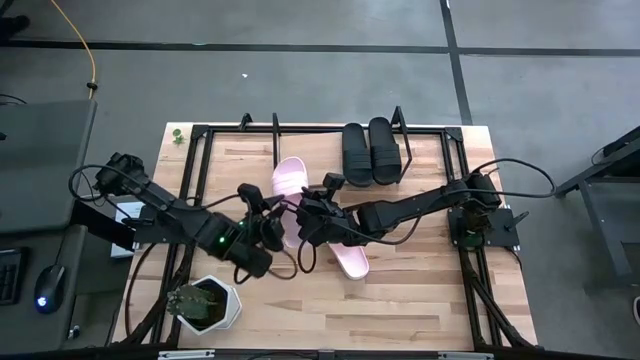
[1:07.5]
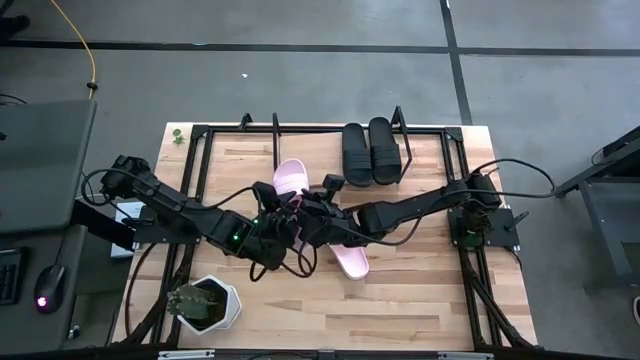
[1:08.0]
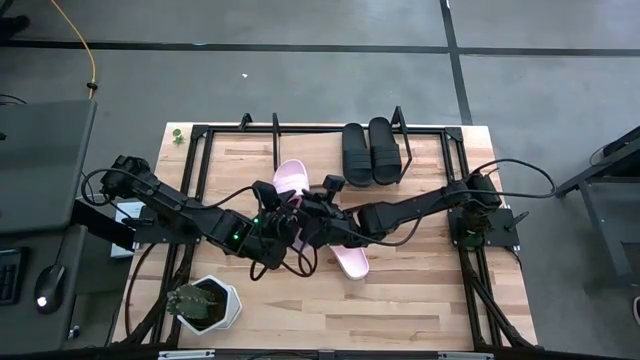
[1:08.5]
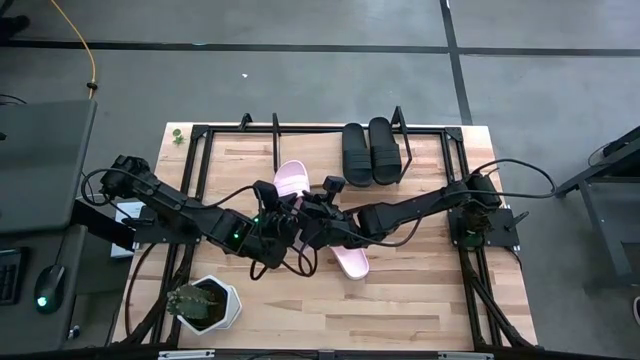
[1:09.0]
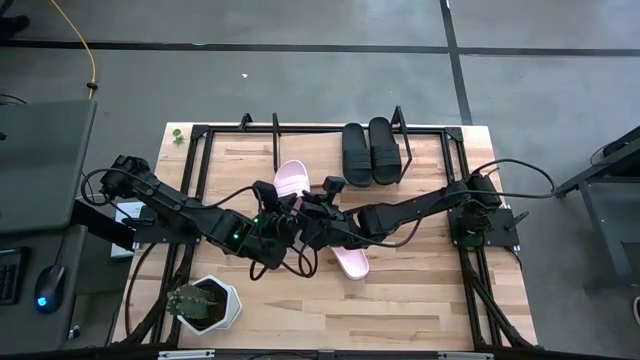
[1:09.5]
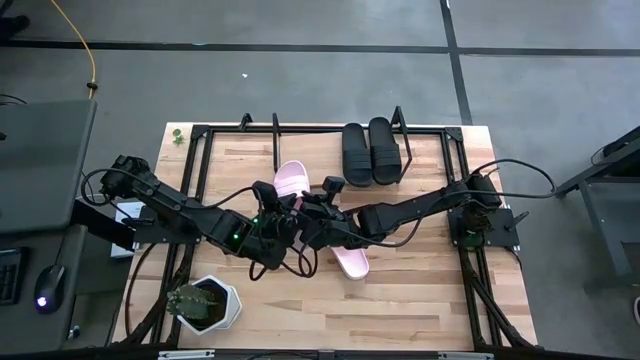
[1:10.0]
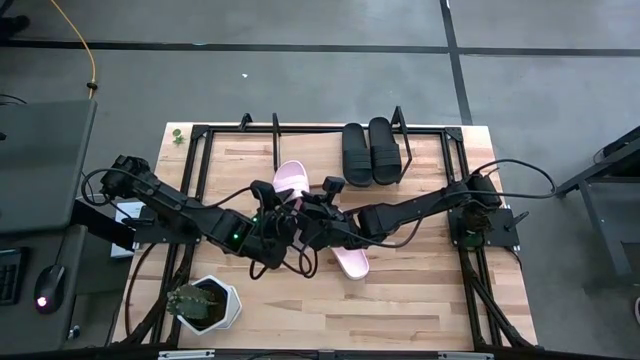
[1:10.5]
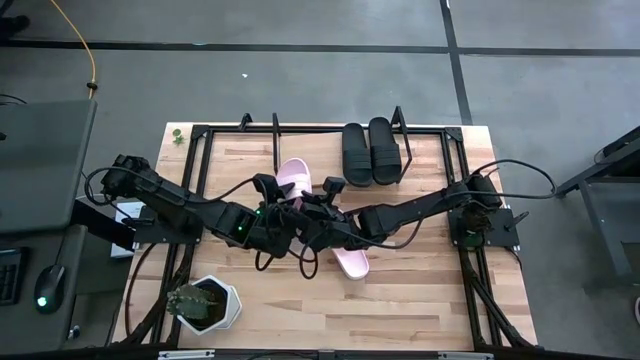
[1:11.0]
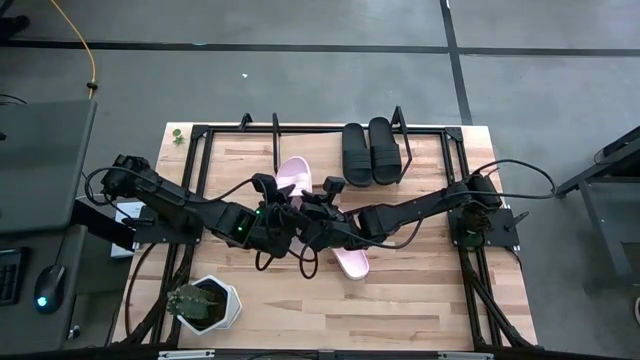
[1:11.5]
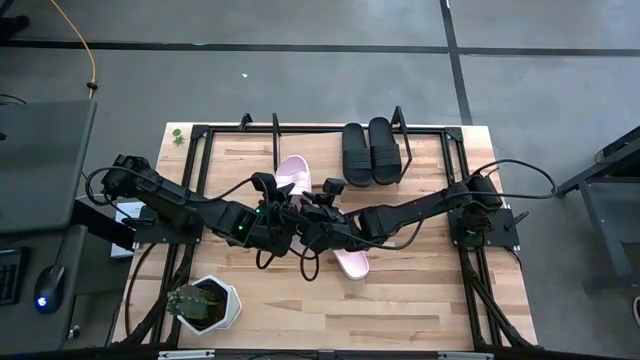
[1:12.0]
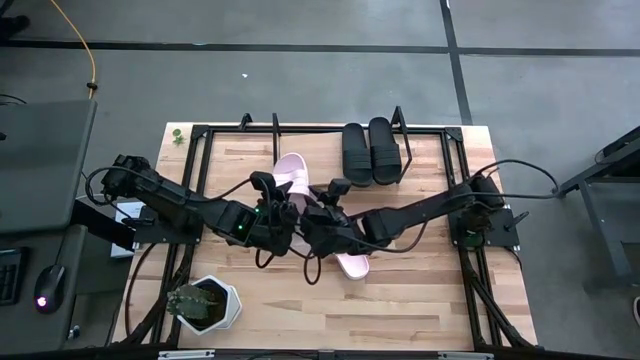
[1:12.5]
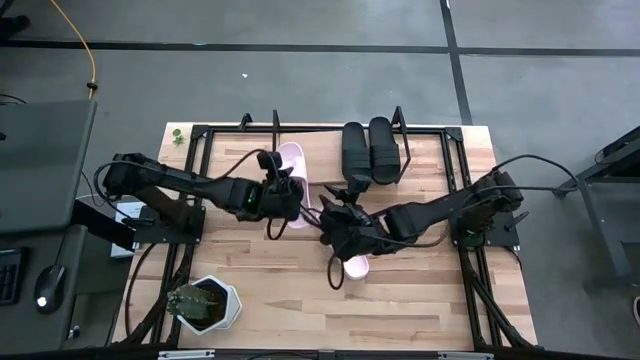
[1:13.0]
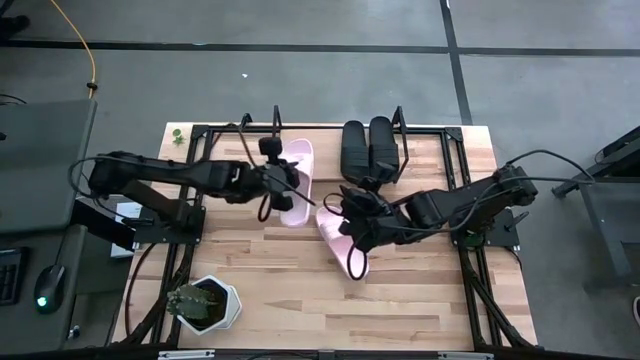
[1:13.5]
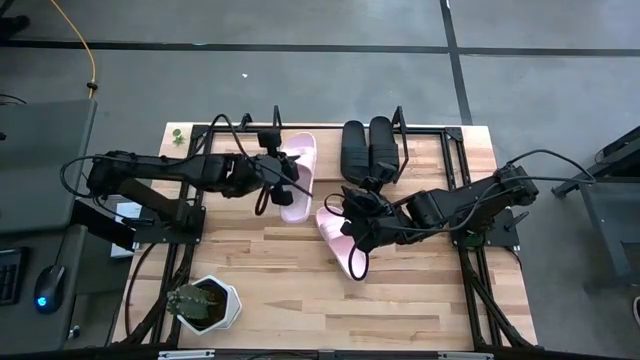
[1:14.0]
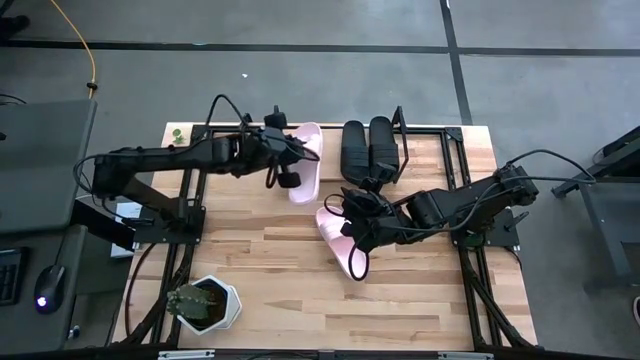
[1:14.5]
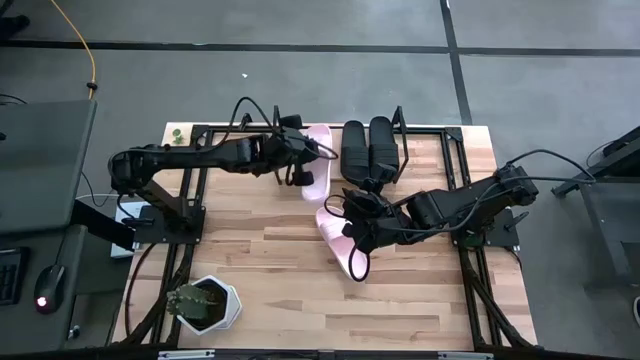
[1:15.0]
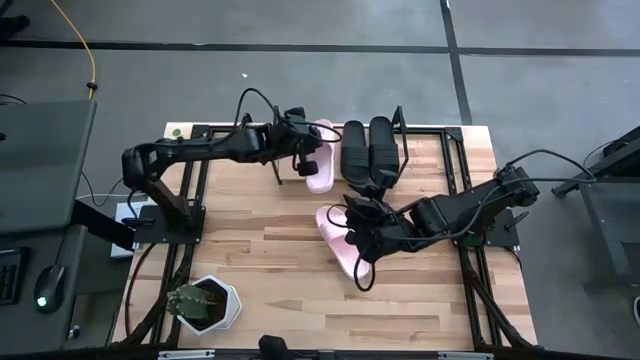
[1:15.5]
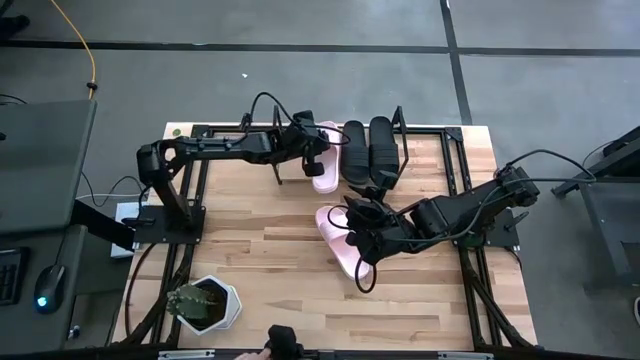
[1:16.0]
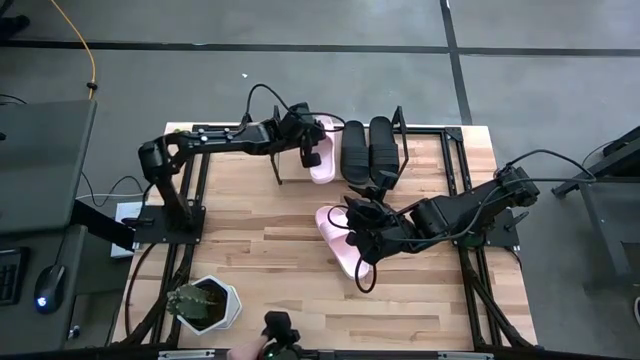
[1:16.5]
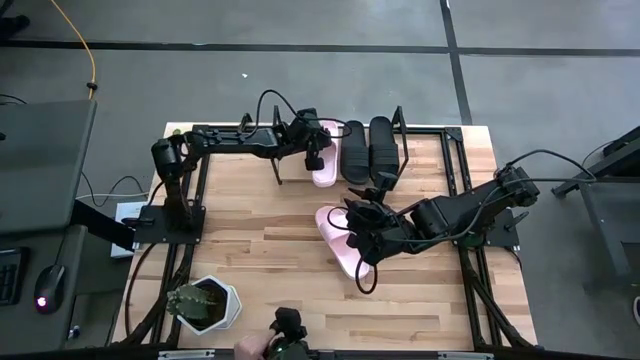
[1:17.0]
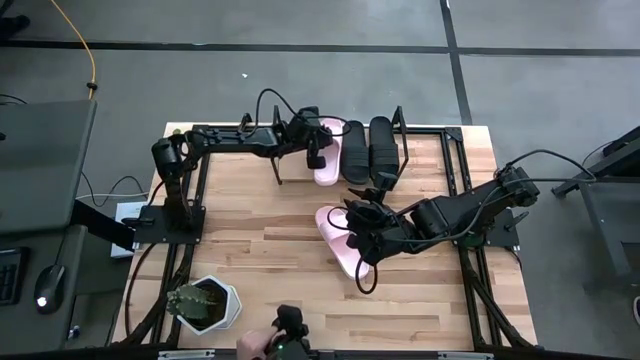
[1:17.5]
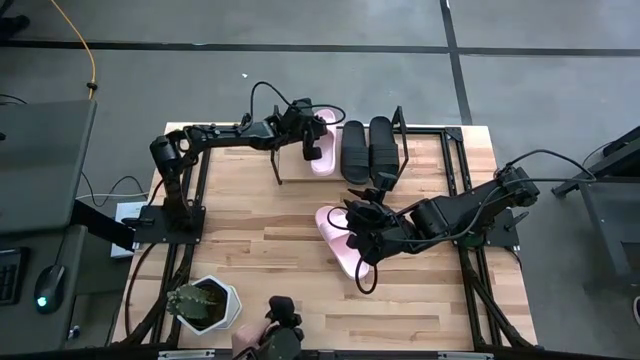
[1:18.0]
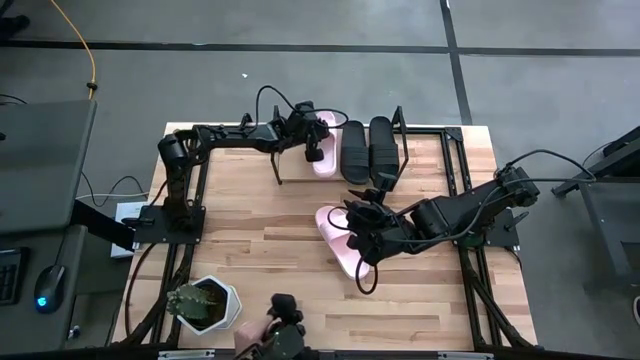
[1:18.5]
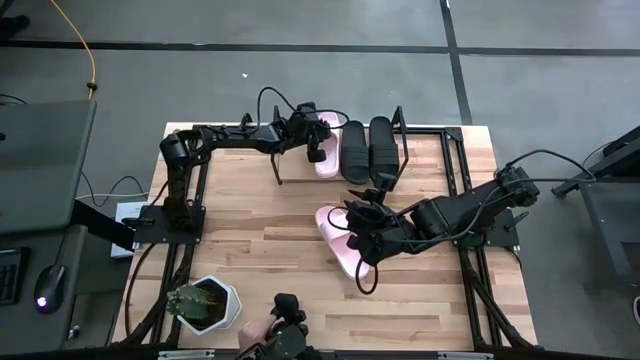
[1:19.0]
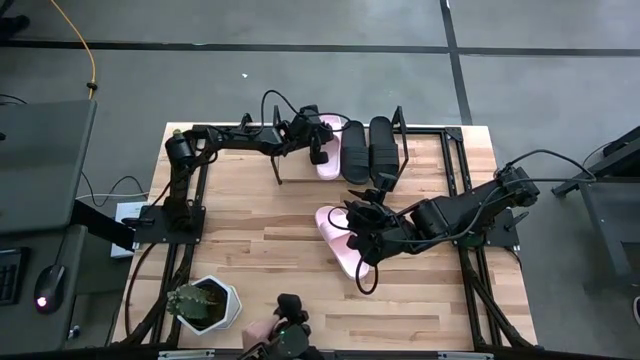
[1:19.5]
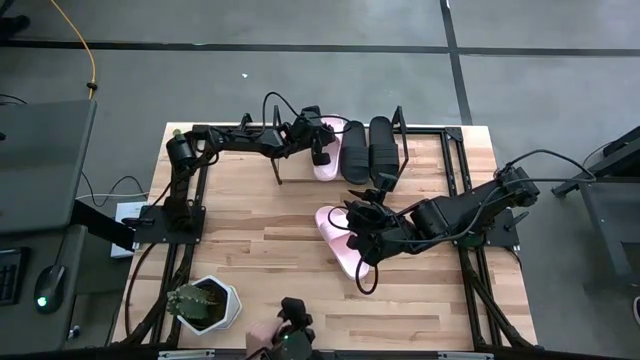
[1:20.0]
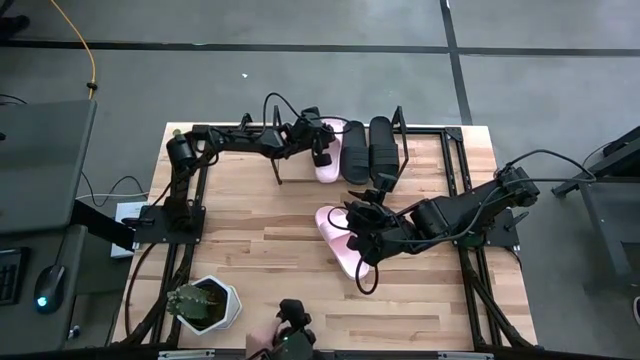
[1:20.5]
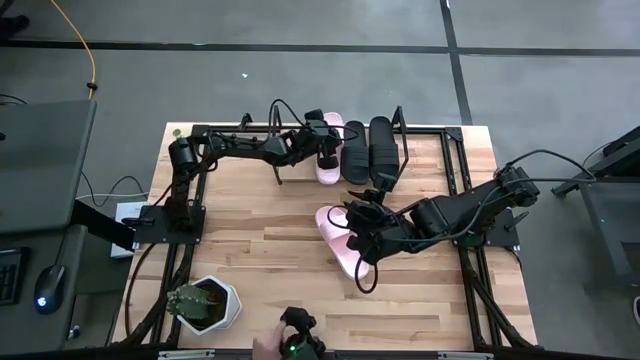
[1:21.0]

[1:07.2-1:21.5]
Task: Pick and place slides into the shelf
Put the left pink slide on the shelf

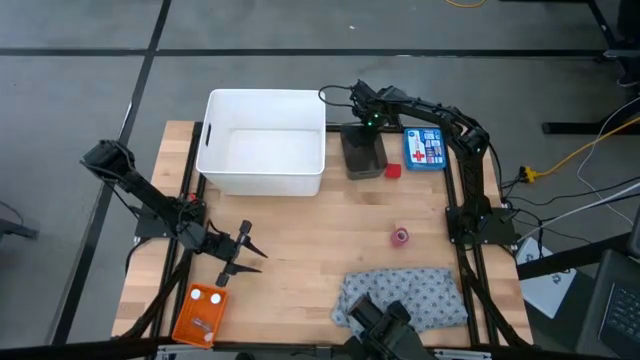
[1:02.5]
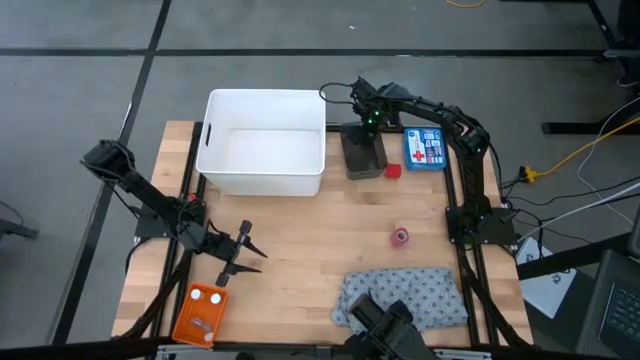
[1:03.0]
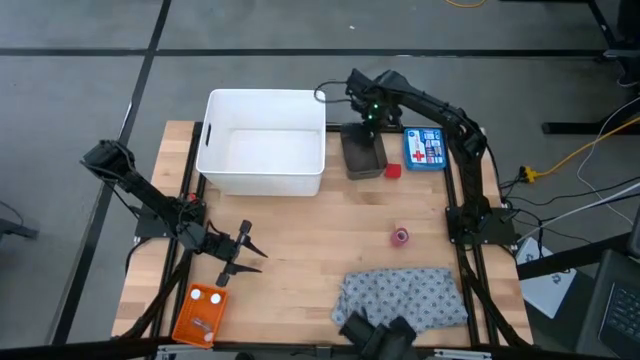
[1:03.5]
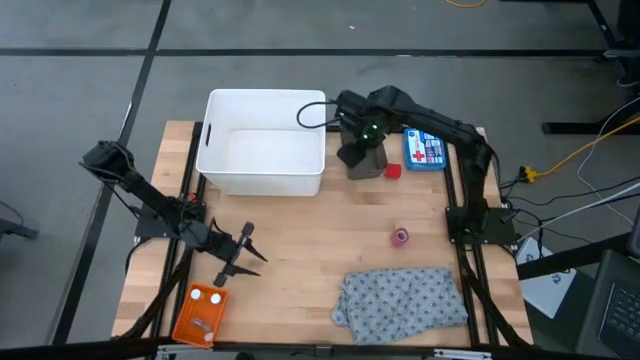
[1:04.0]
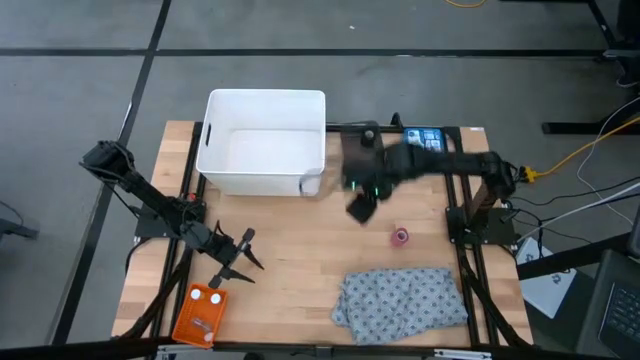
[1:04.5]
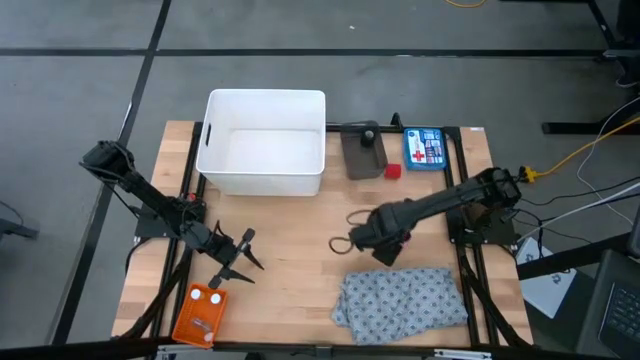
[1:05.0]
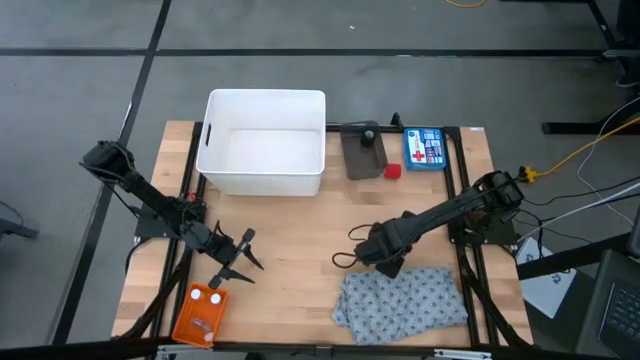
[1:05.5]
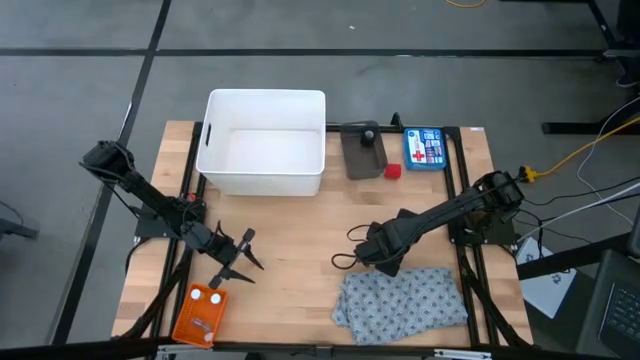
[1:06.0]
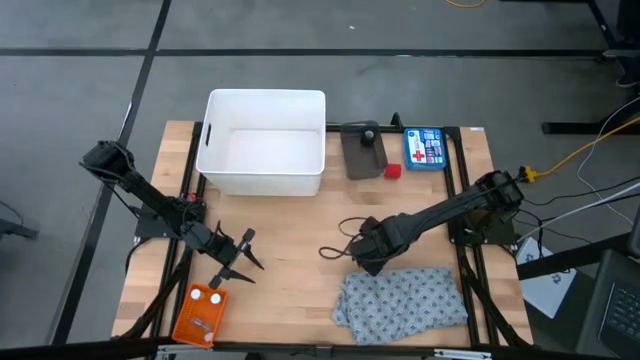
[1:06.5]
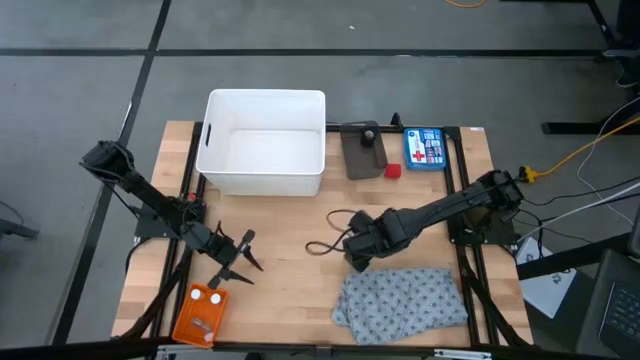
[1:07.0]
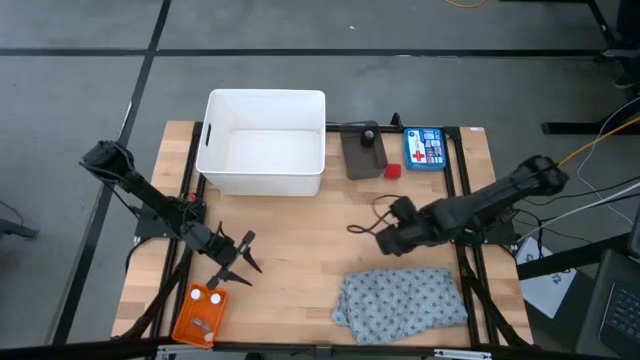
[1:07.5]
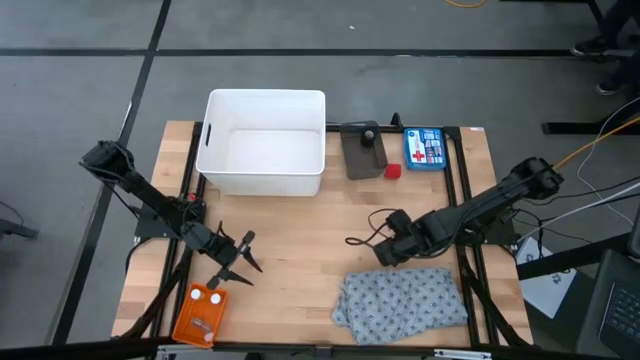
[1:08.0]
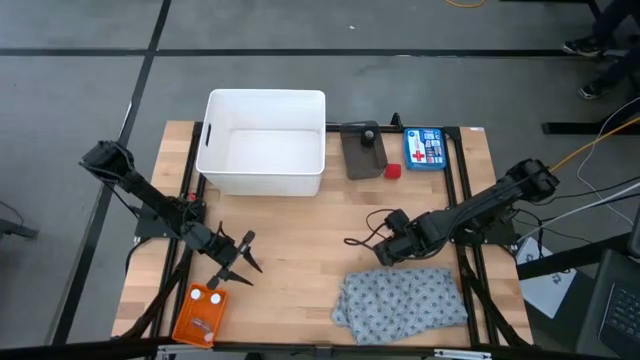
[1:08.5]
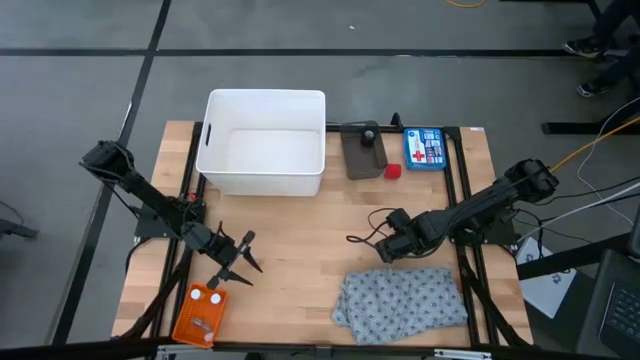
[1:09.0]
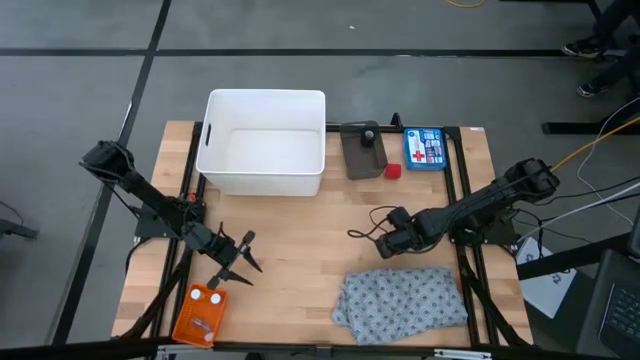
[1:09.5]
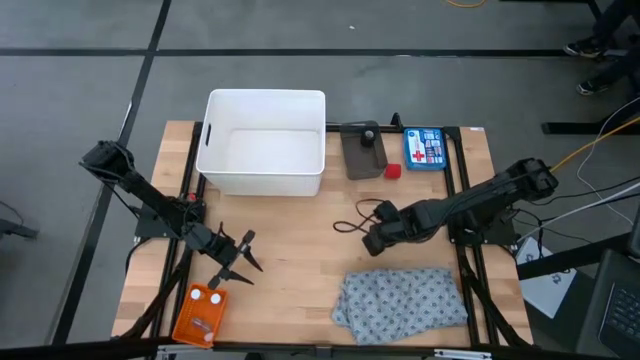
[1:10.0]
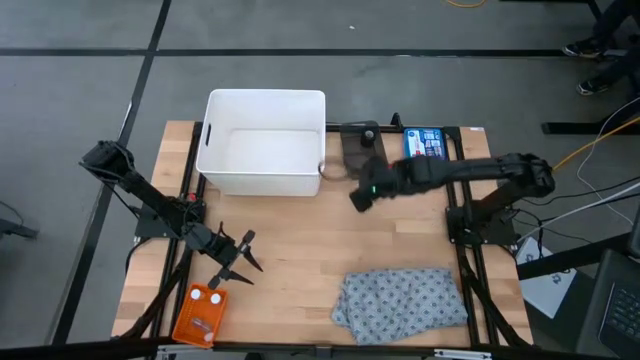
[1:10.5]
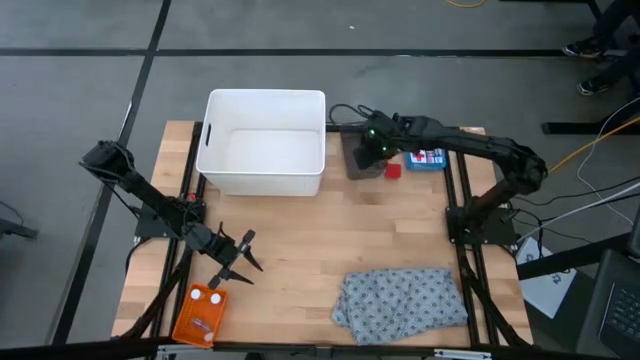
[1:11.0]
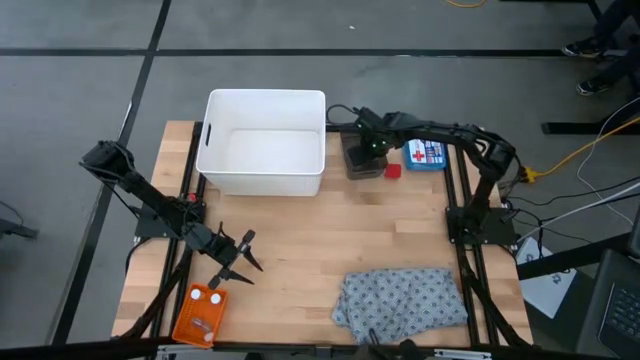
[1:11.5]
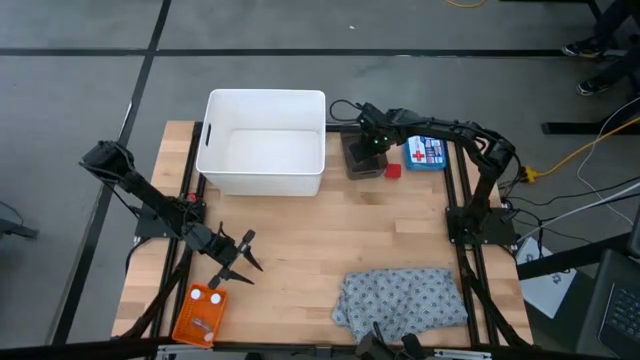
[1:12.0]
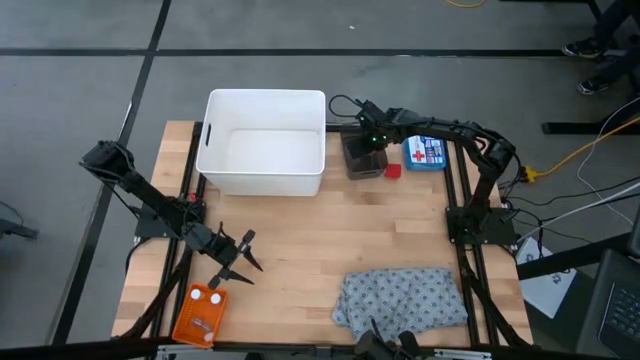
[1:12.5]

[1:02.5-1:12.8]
Task: Pick & place medical supplies in basket/bin
Put the pink bandage into the black bin
